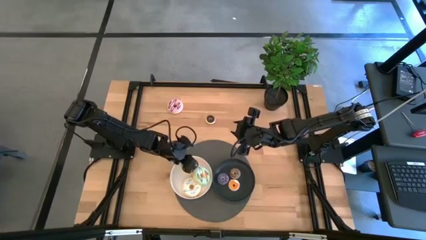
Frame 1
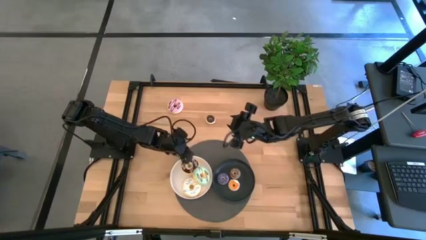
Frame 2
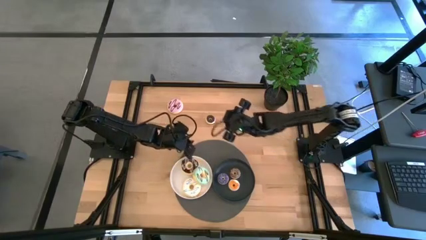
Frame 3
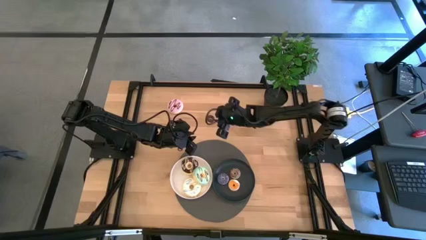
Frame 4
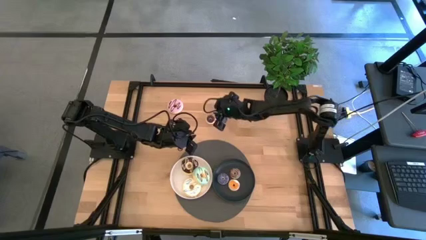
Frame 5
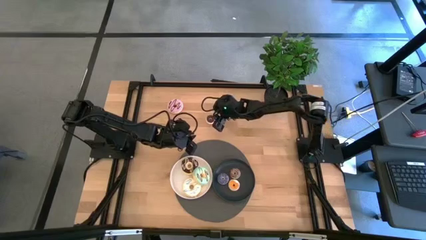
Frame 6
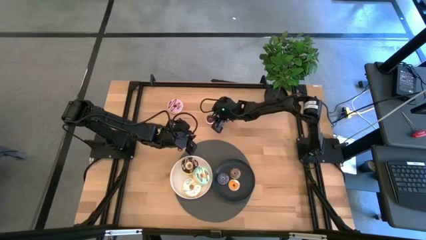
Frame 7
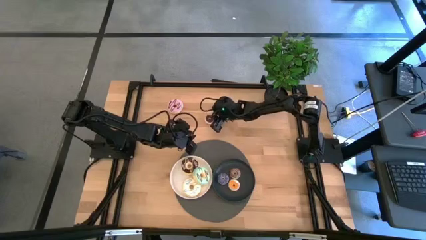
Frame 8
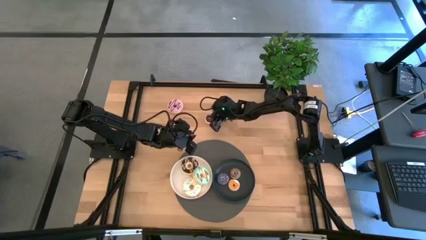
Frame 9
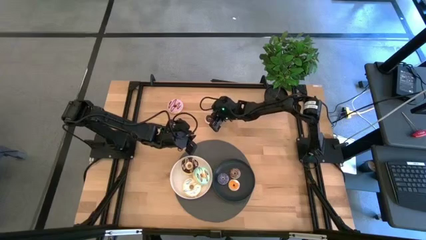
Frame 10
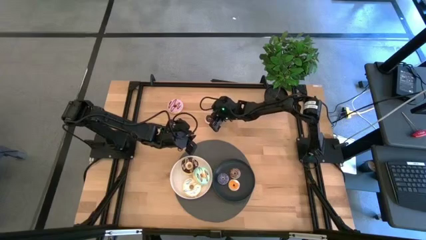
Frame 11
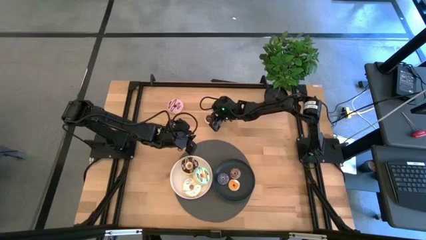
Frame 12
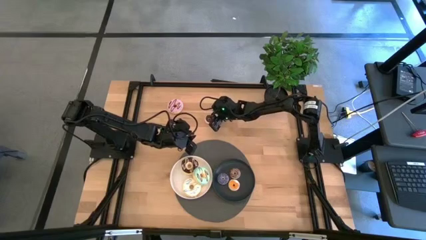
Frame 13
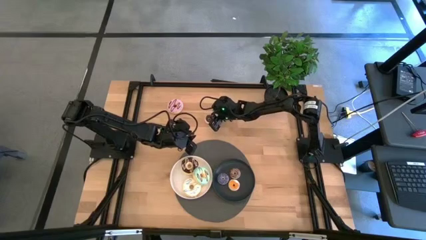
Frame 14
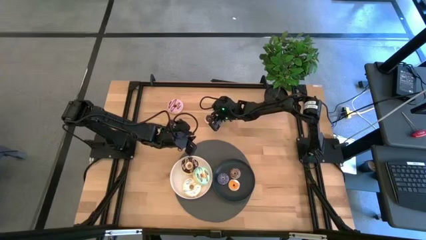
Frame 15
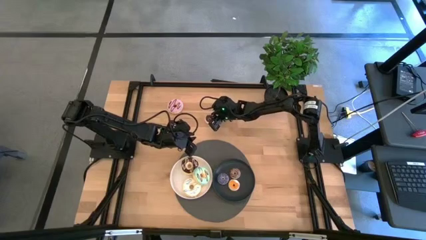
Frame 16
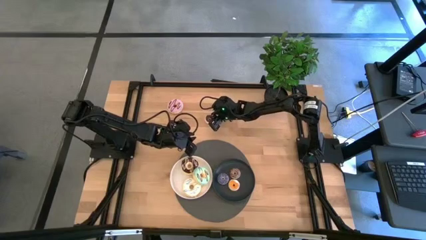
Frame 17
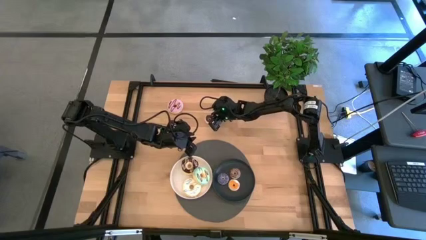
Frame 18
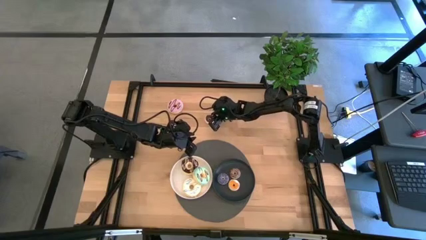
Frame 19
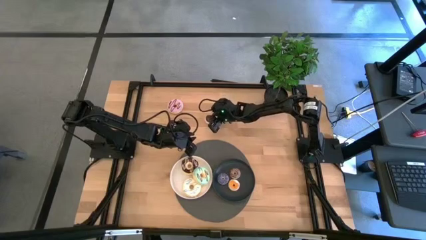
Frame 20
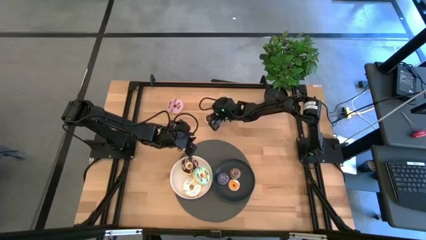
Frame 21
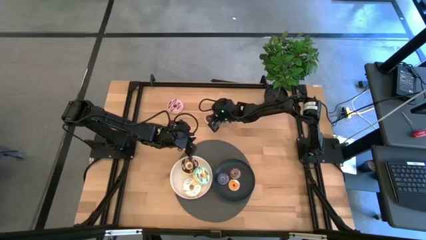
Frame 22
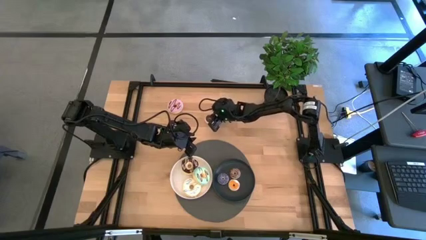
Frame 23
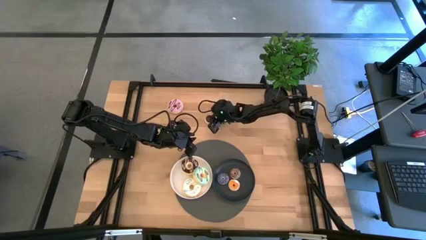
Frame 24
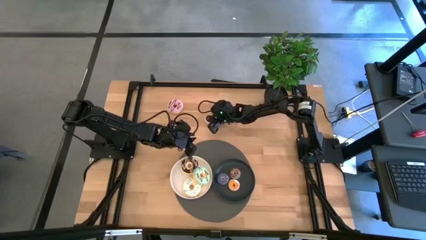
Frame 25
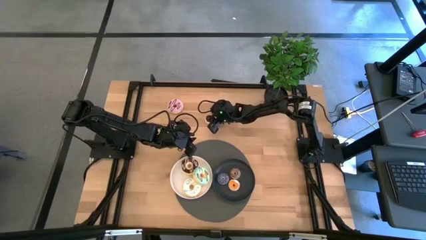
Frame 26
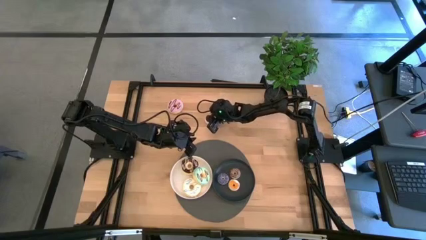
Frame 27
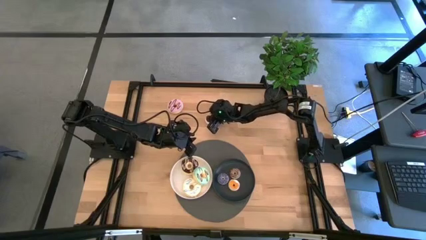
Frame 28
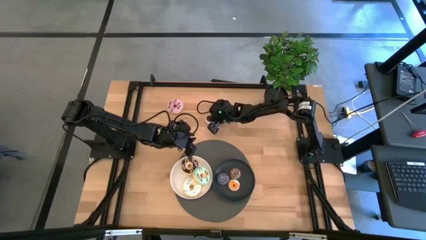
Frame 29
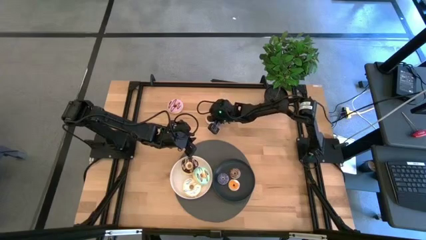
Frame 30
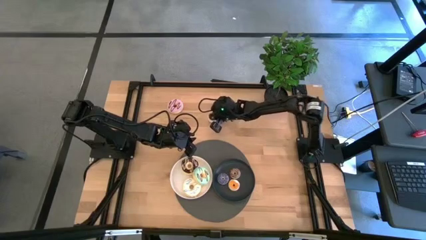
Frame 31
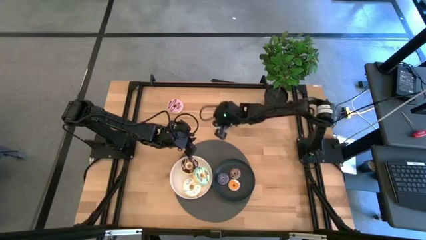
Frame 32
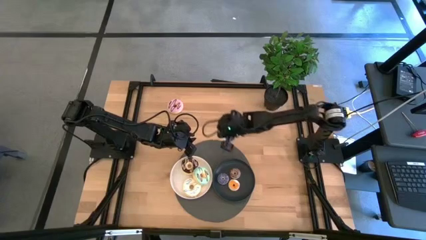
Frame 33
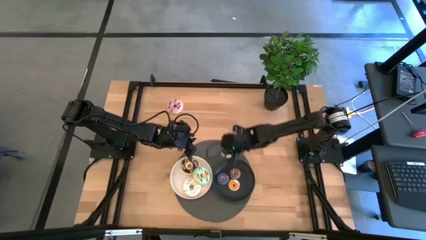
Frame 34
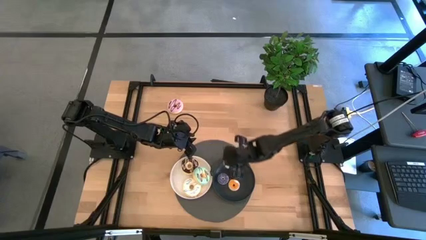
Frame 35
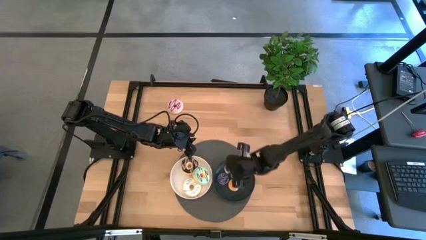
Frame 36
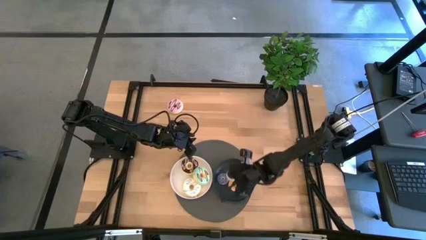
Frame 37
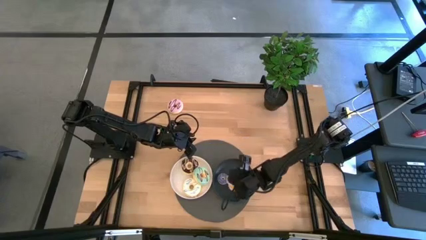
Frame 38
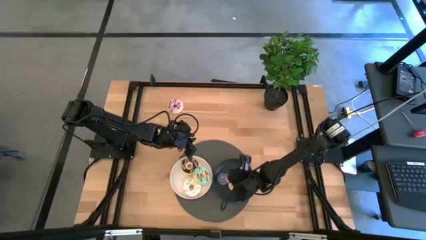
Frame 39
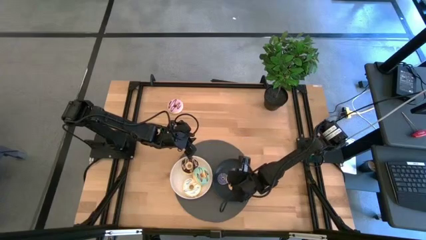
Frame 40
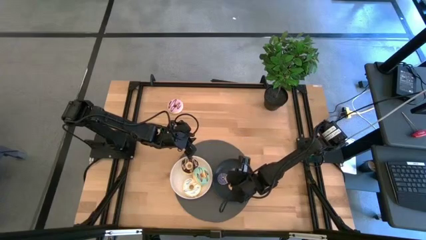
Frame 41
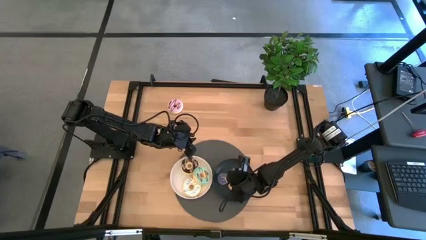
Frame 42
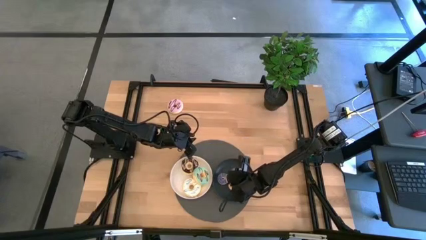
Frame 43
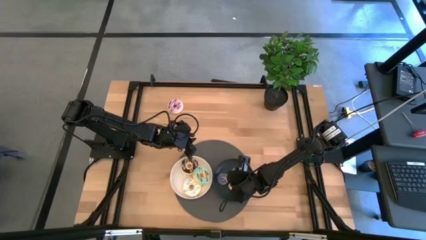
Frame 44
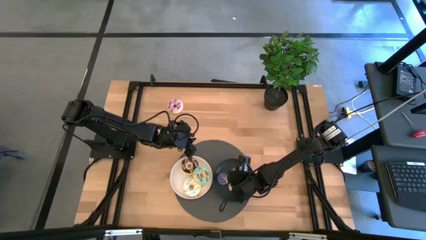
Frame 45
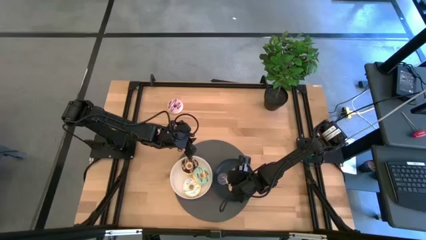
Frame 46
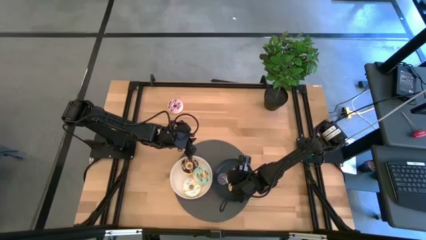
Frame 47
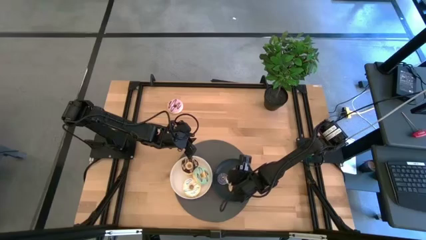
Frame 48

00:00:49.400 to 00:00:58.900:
Task: Pick & Place donuts
Put the small black donut on the black plate

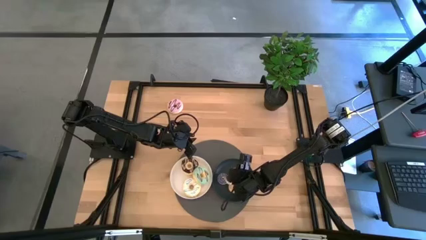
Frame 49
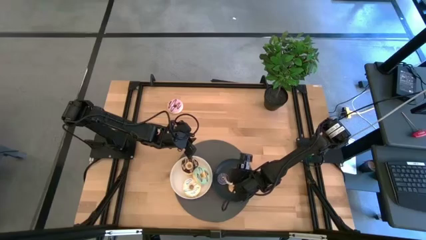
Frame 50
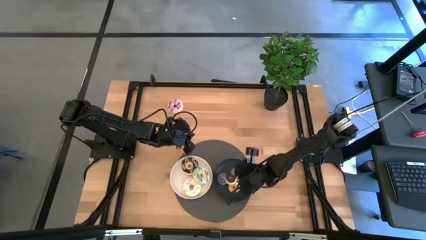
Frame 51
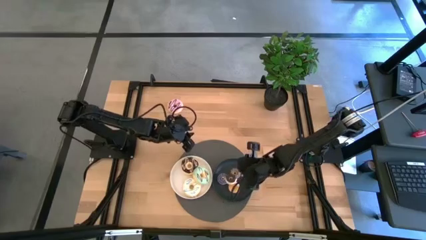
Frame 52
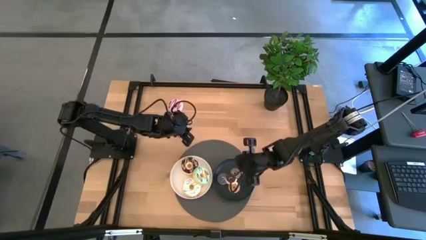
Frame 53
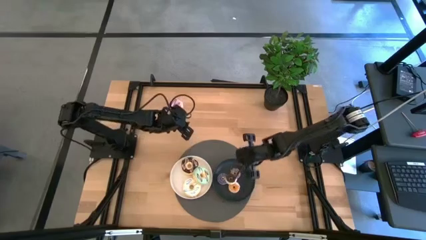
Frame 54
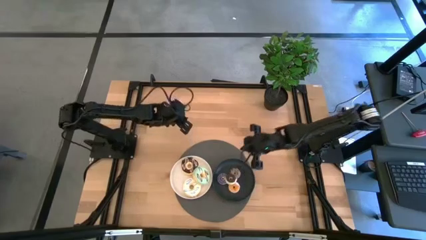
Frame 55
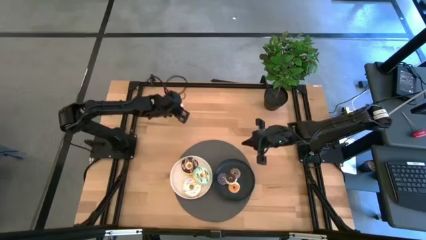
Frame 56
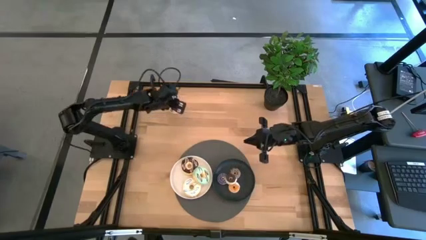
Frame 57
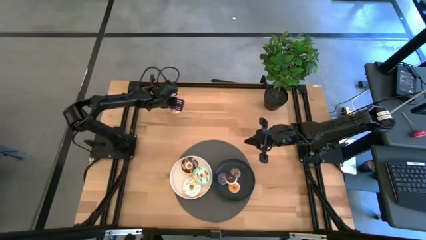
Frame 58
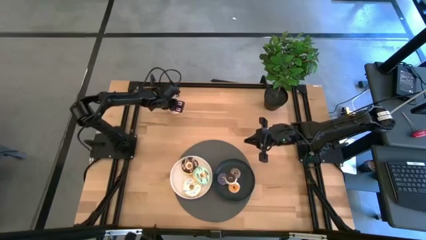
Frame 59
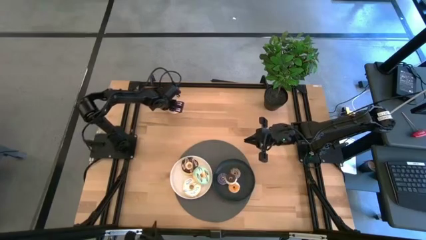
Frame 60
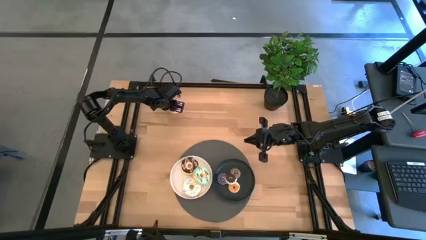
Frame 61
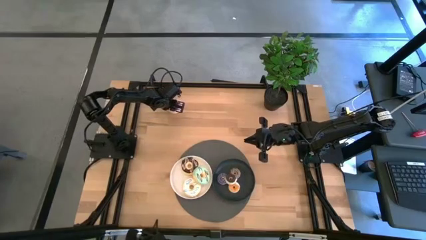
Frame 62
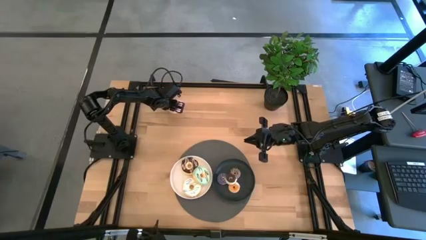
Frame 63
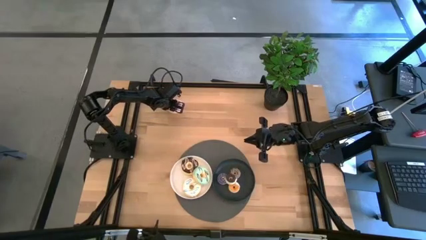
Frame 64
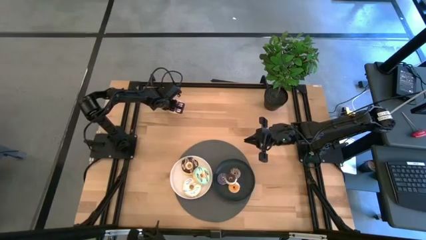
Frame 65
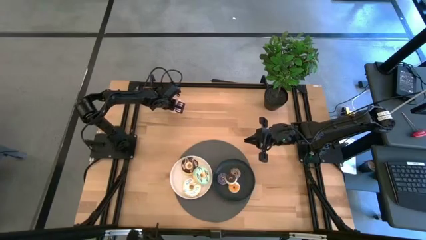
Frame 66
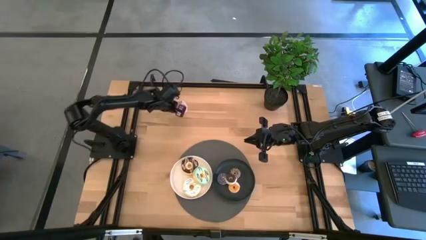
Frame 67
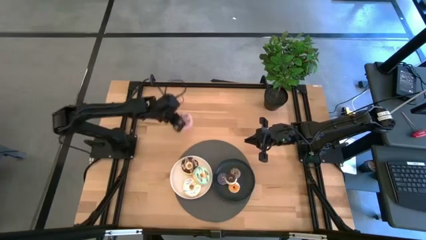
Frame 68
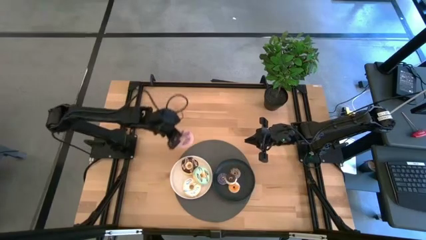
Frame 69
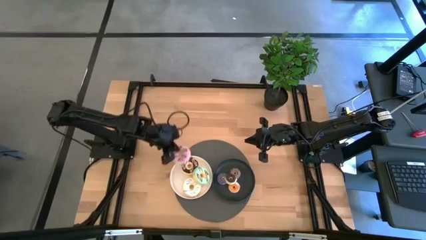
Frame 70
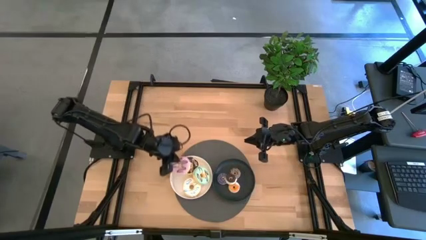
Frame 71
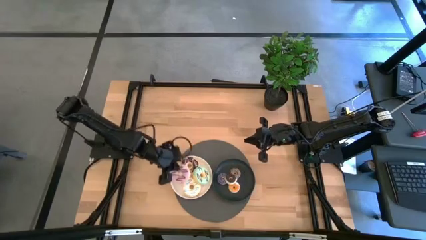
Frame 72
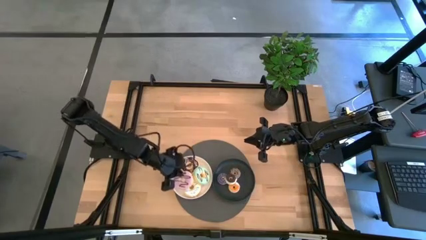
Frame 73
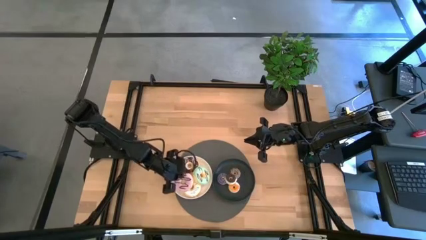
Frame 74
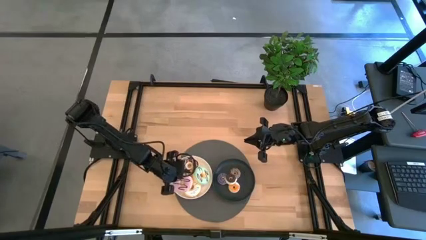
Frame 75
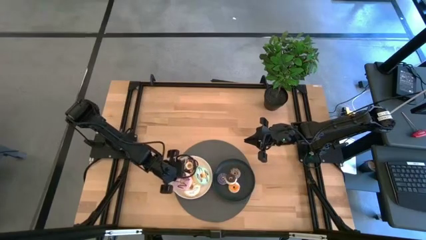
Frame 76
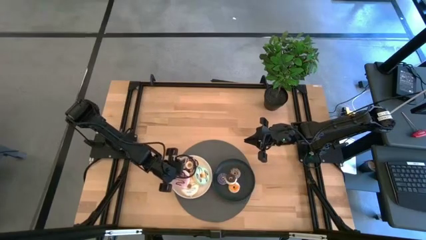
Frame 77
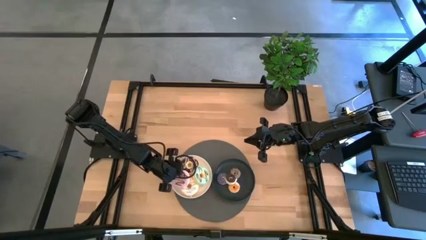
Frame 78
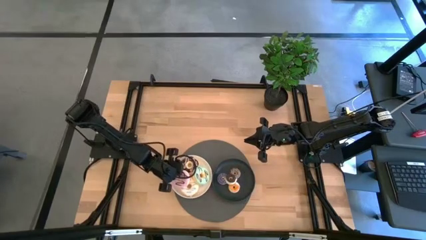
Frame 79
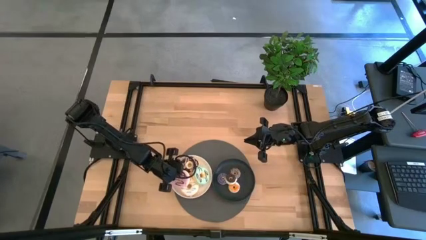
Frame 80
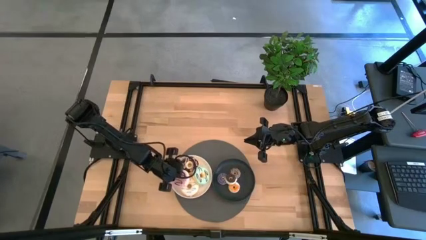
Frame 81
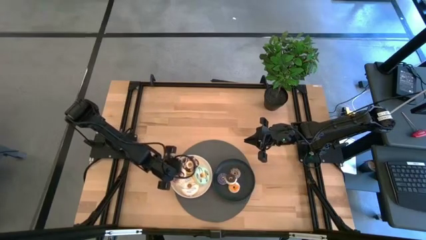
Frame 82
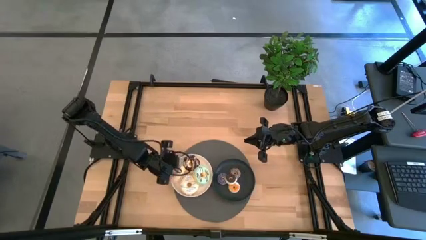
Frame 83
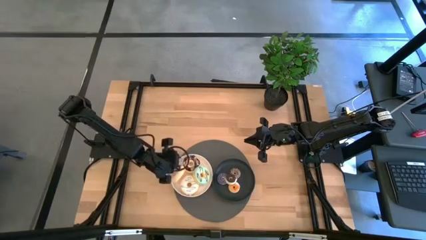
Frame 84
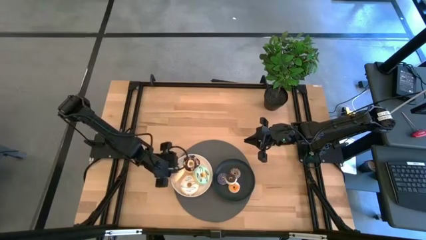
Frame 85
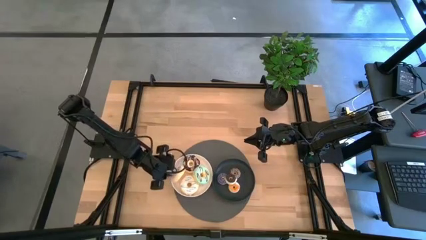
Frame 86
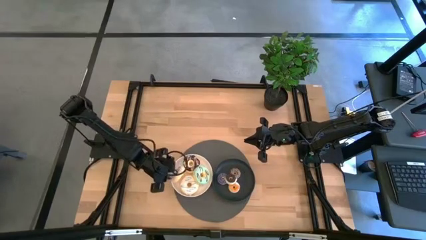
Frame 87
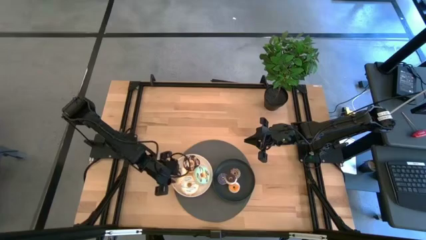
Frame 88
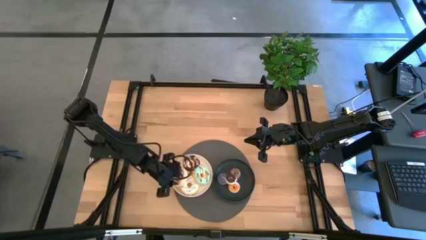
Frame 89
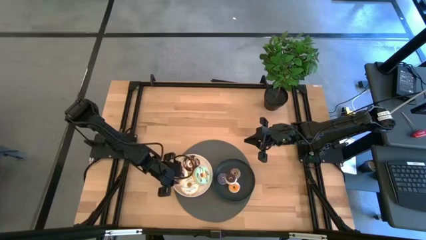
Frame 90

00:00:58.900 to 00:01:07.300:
Put the big purple donut on the white plate
